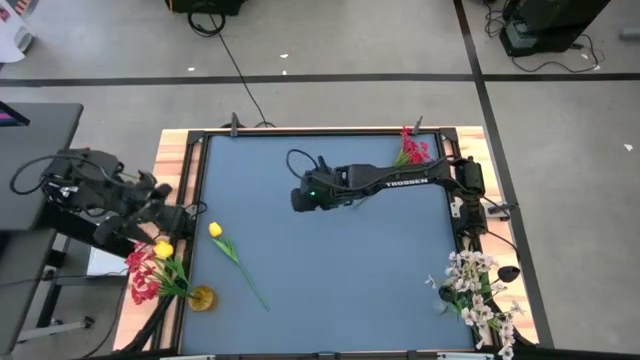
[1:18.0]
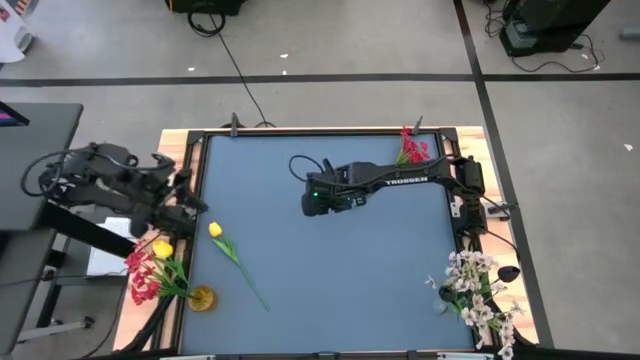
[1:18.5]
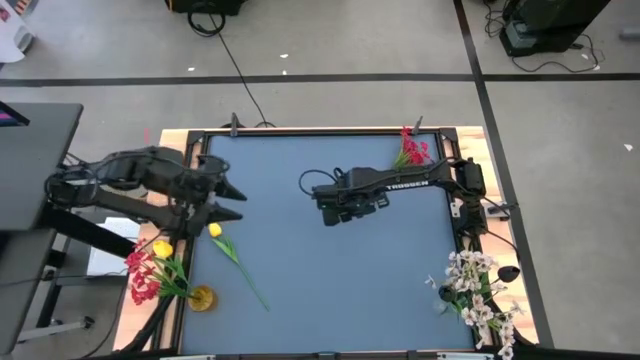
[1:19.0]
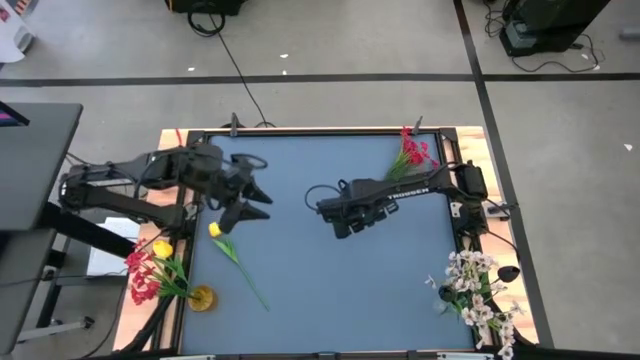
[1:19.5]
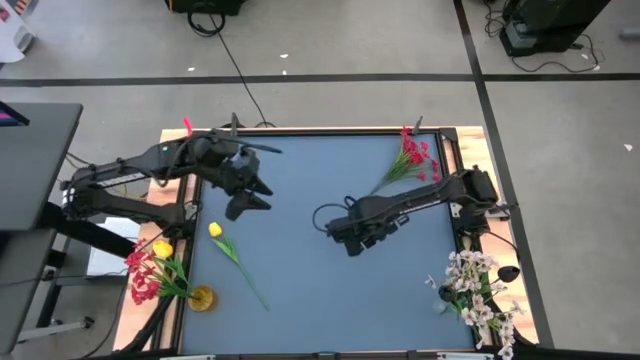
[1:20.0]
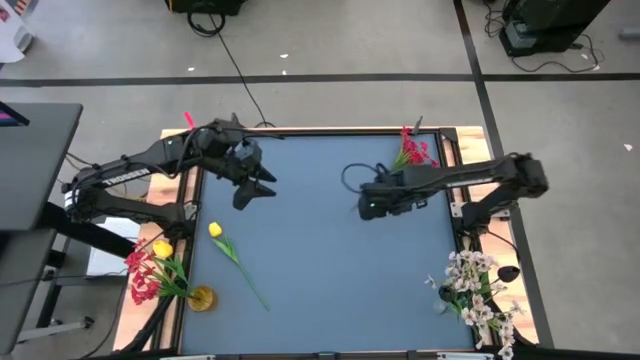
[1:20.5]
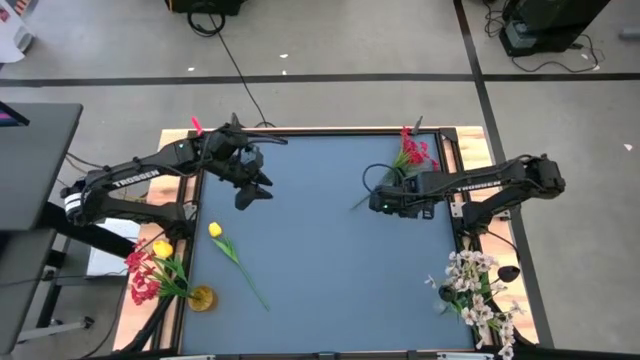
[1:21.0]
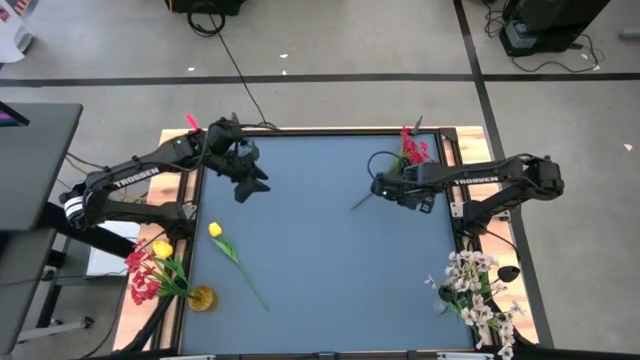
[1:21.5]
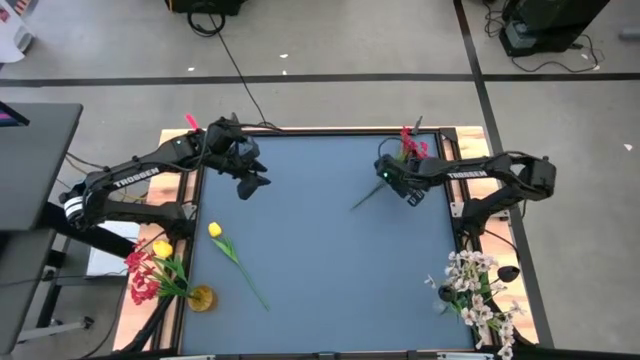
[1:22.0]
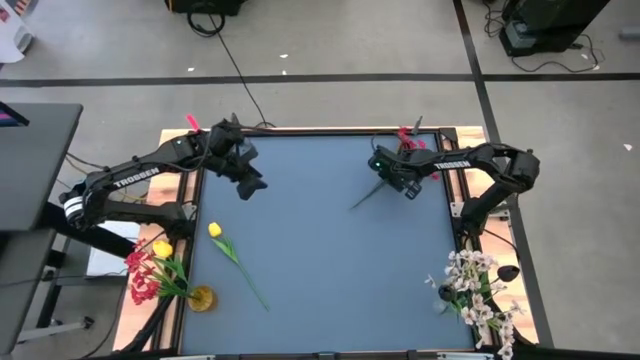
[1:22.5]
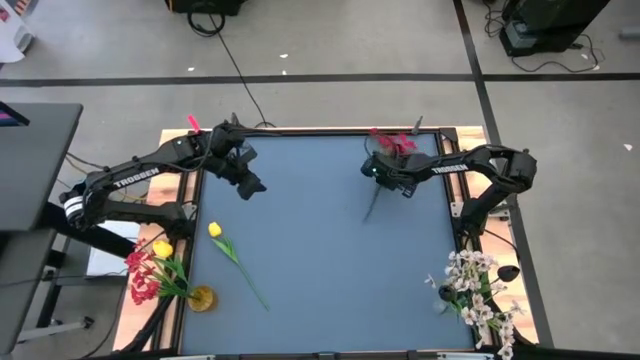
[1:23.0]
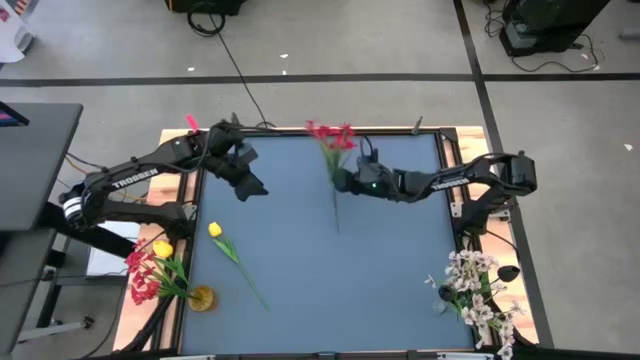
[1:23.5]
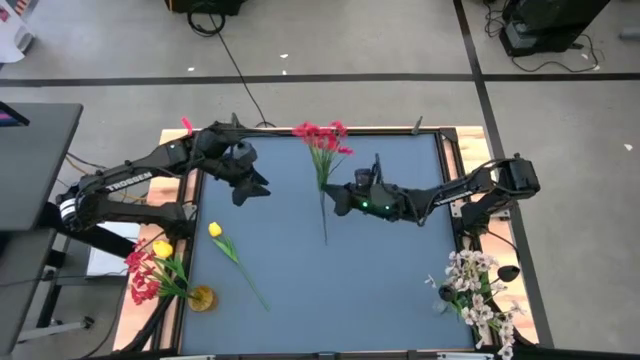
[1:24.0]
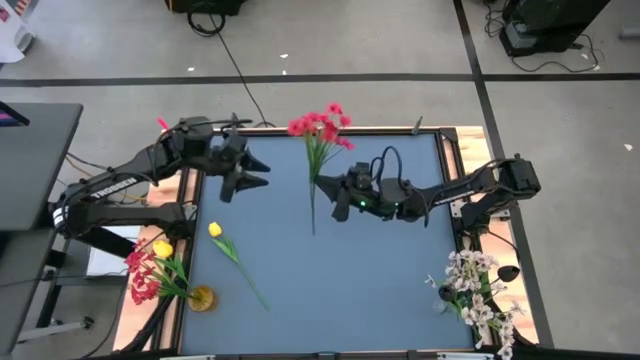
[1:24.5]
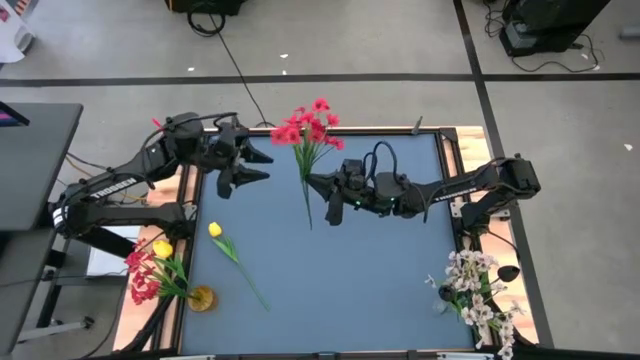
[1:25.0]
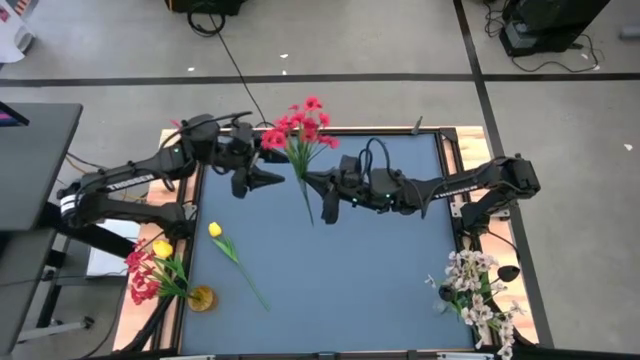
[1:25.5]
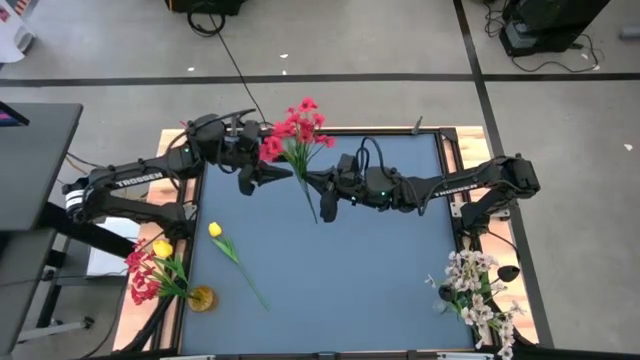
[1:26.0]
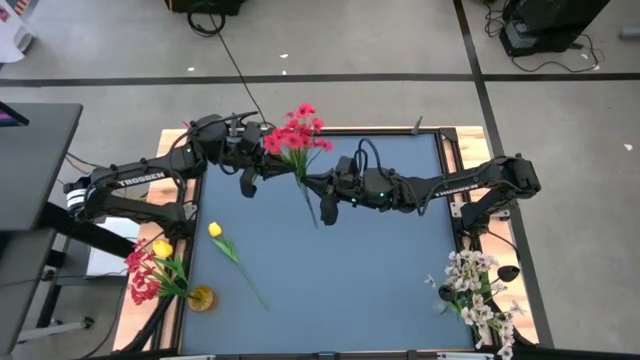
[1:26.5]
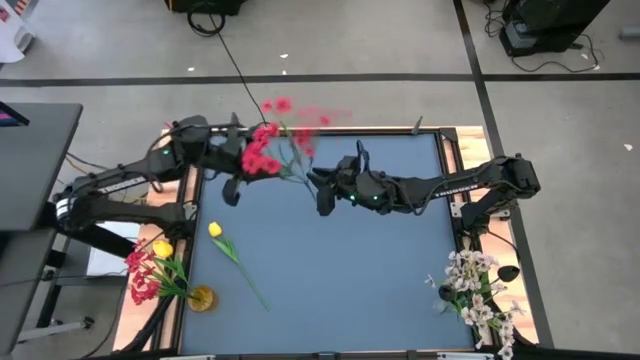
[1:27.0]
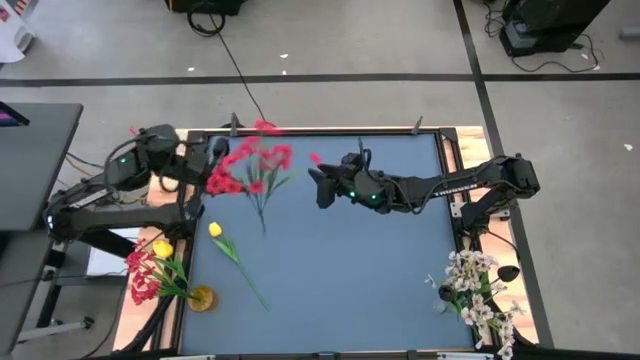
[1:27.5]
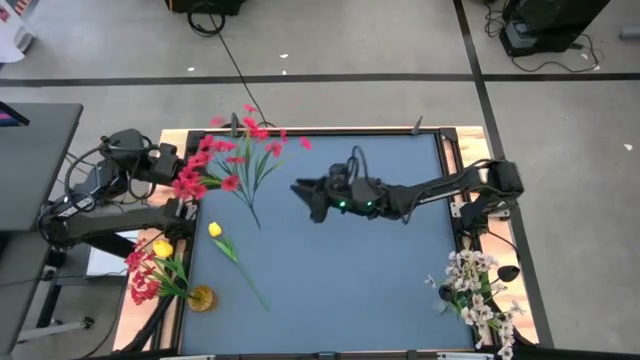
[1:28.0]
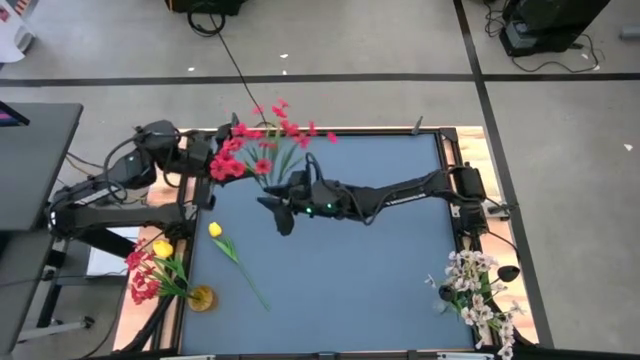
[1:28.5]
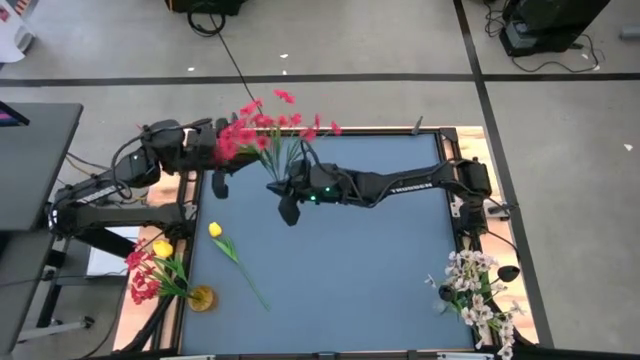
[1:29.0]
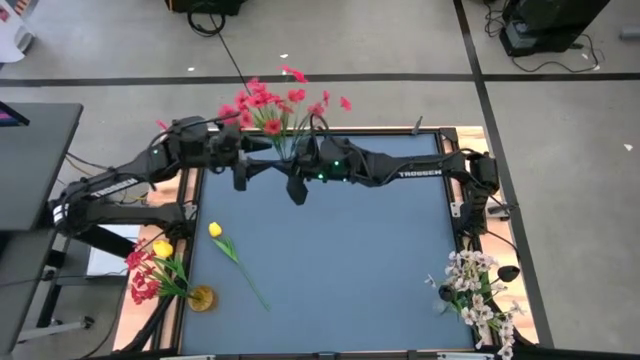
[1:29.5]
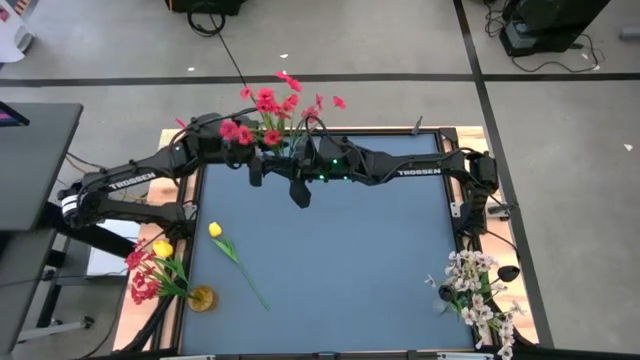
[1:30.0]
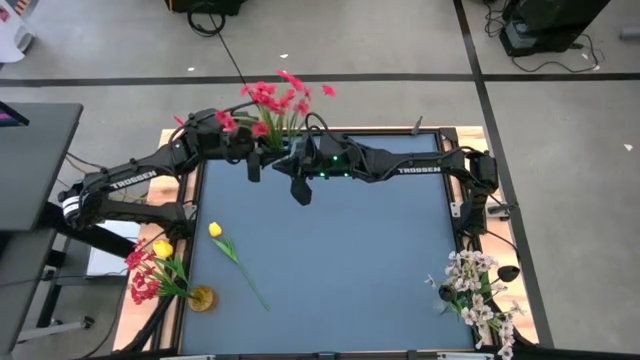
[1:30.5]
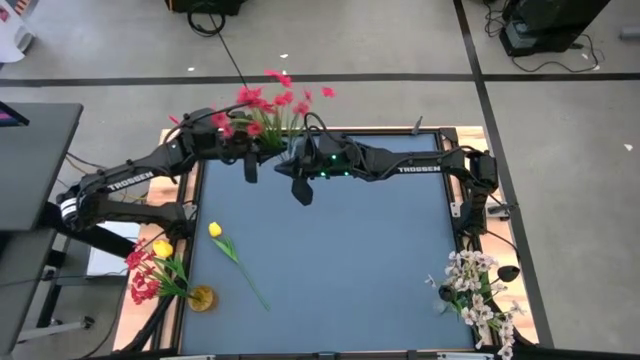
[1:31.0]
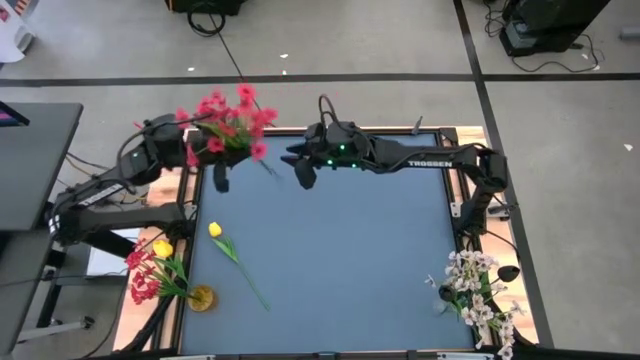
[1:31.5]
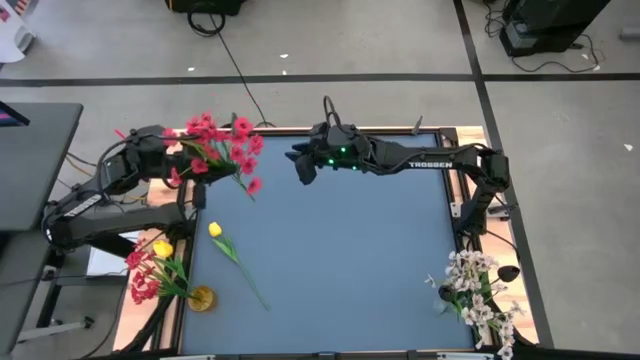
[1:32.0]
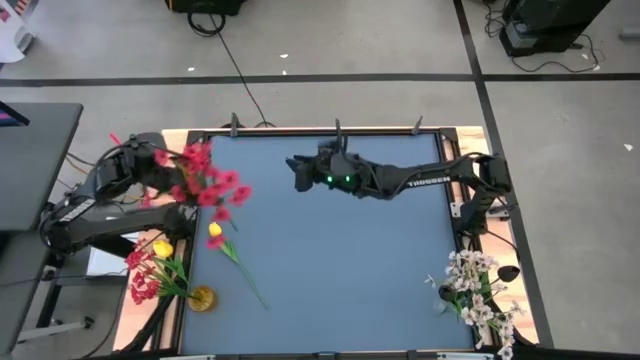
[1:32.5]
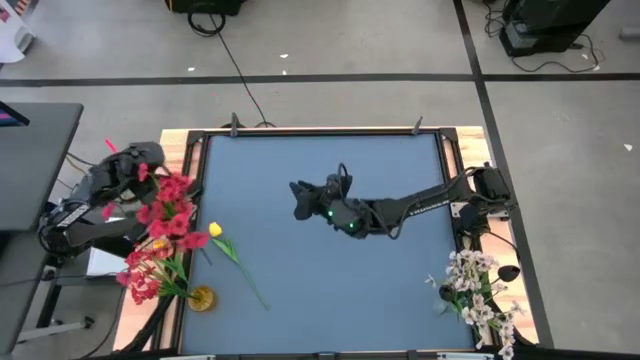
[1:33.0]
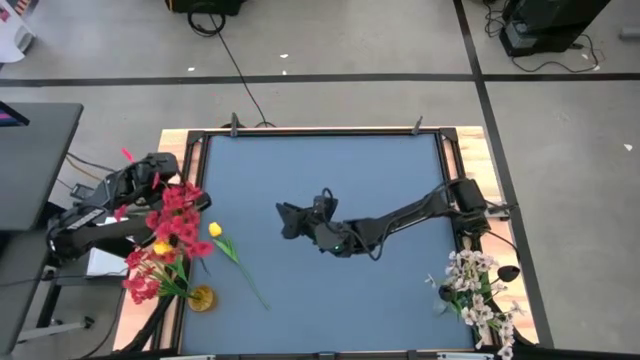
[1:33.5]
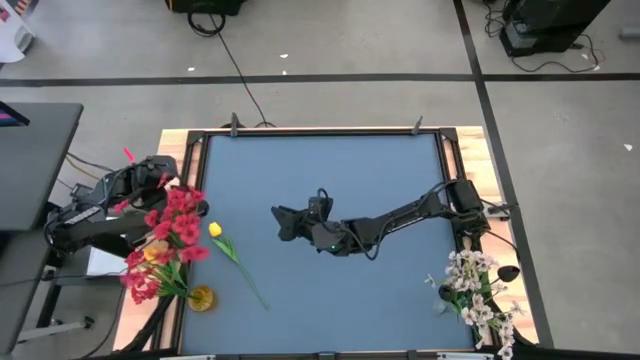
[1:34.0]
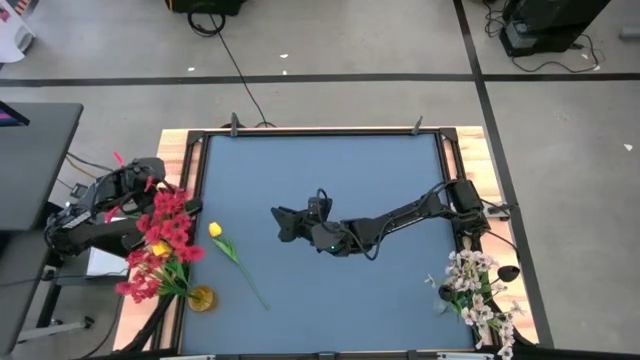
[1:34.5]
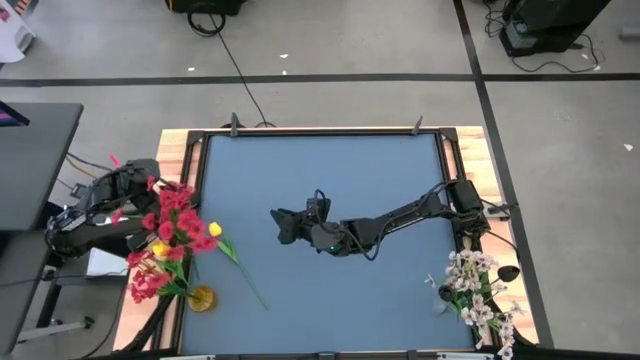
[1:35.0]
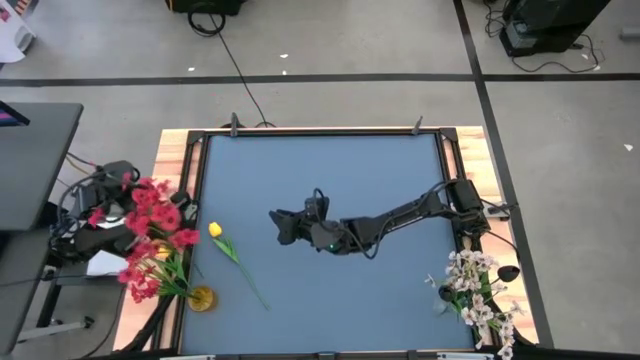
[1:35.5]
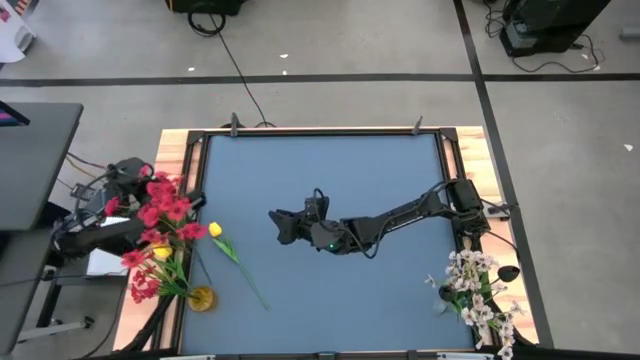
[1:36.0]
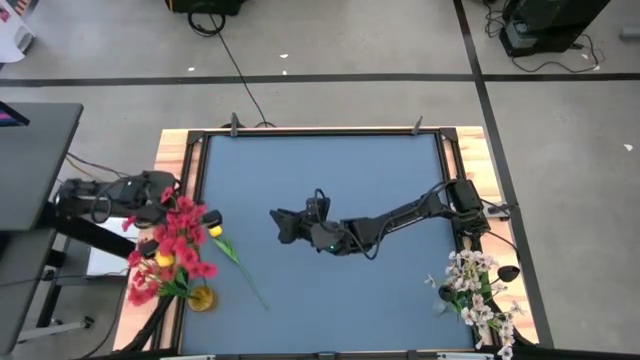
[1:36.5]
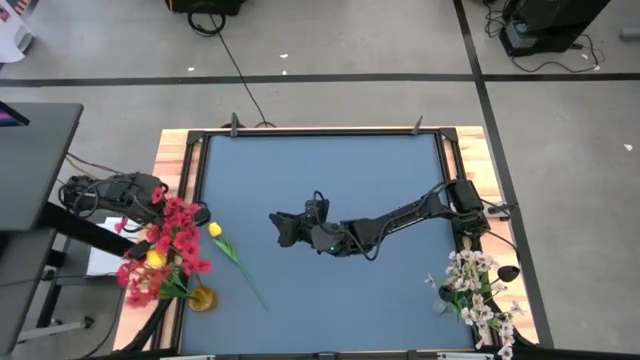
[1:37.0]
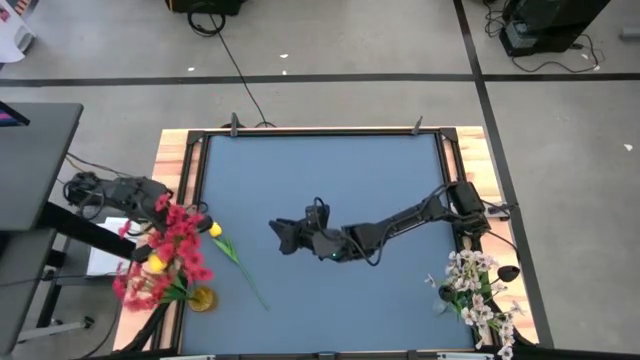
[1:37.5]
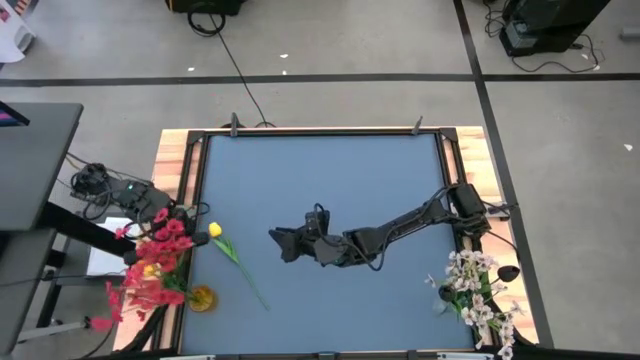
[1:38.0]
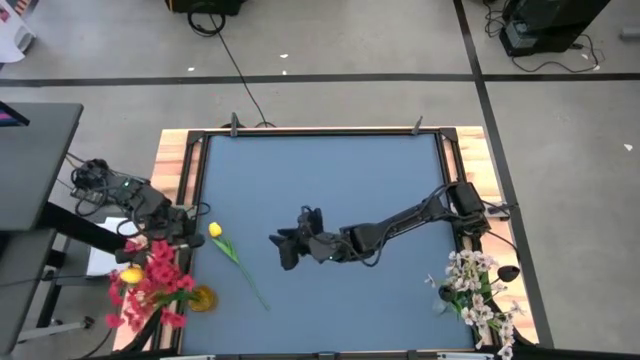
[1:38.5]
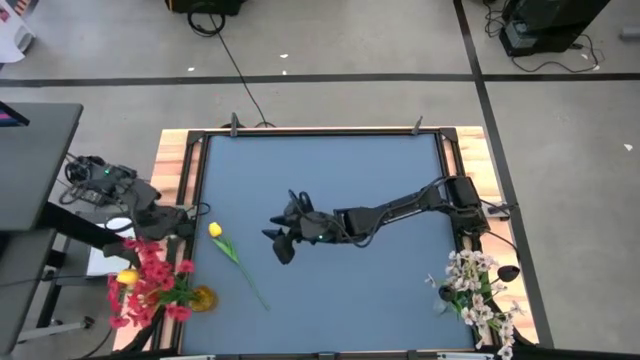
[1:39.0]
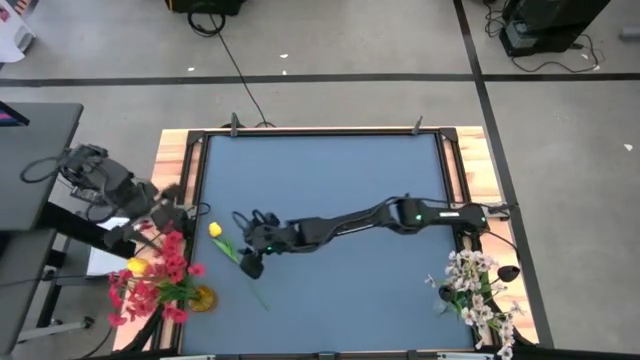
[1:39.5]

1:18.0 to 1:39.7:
Task: Sort flowers into vase by color
Put the red flowers into the yellow vase
